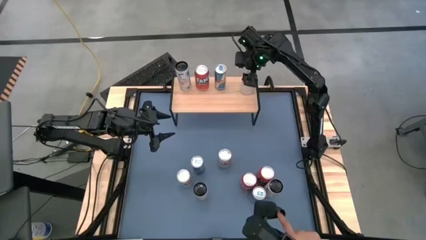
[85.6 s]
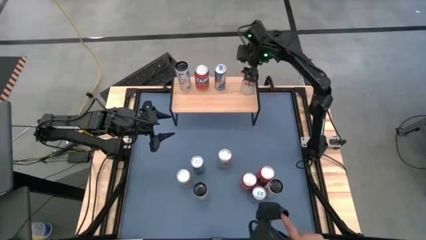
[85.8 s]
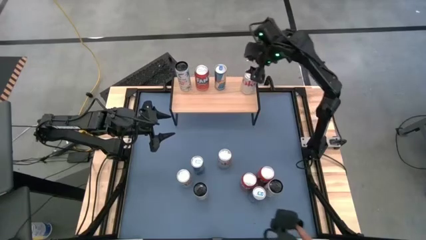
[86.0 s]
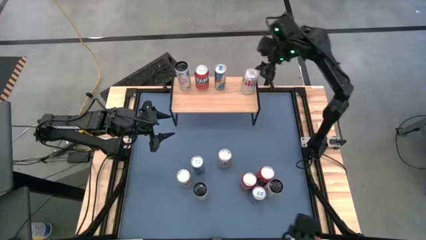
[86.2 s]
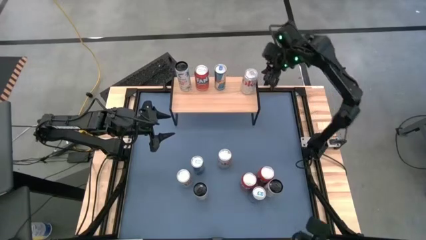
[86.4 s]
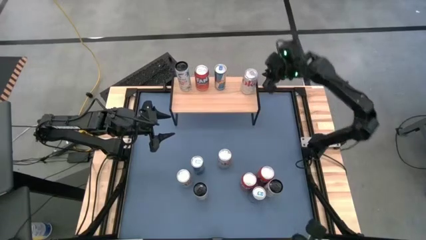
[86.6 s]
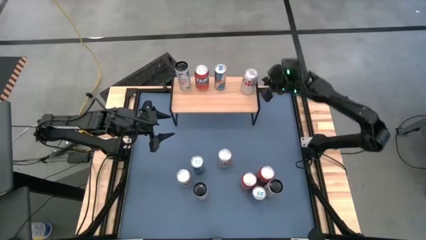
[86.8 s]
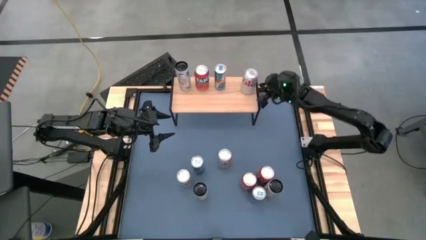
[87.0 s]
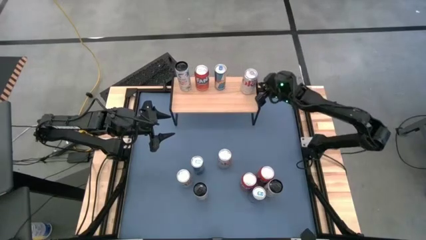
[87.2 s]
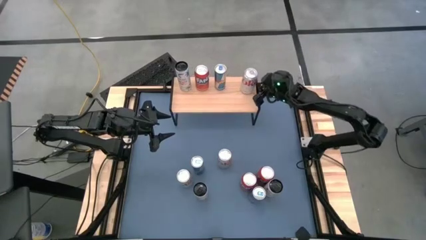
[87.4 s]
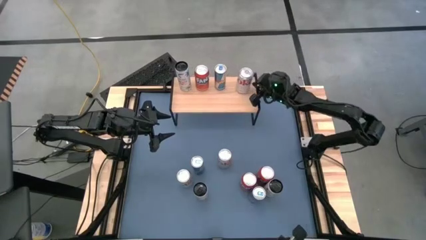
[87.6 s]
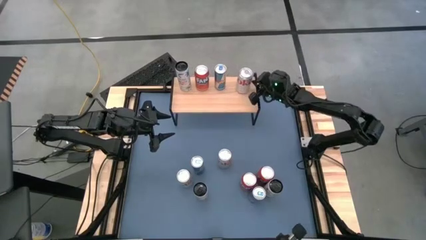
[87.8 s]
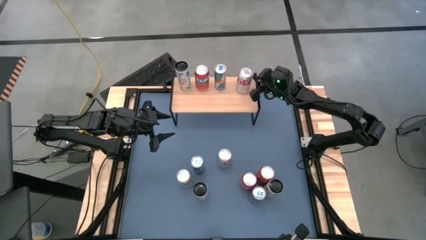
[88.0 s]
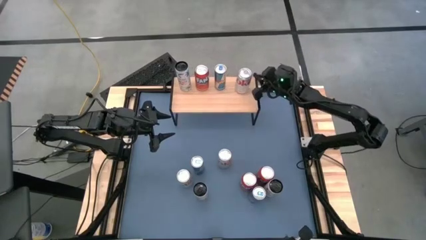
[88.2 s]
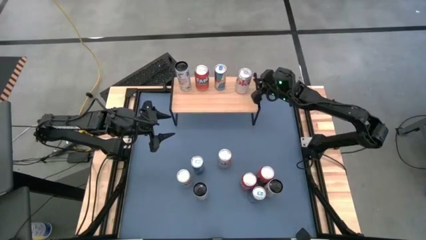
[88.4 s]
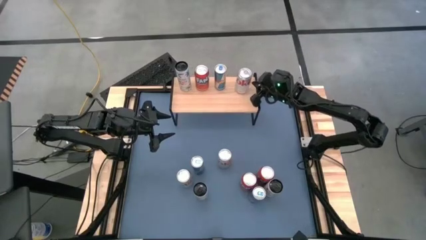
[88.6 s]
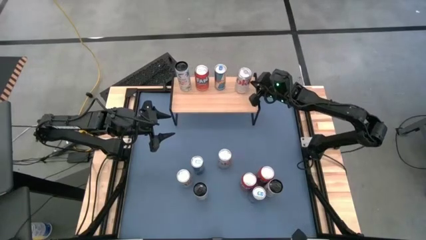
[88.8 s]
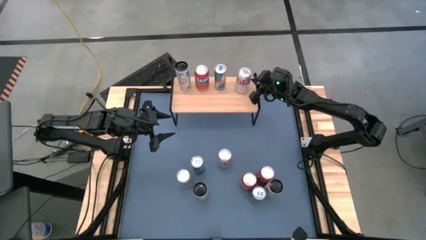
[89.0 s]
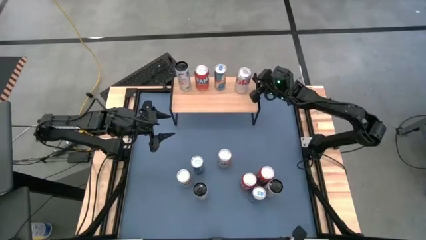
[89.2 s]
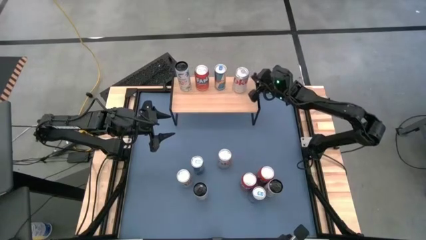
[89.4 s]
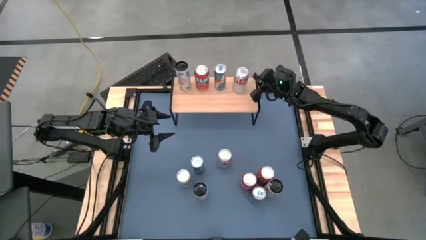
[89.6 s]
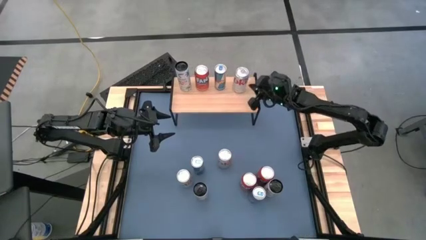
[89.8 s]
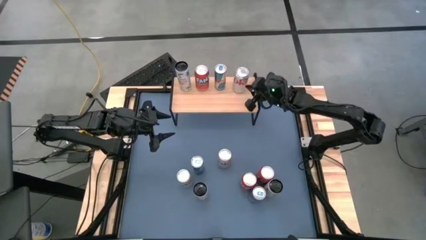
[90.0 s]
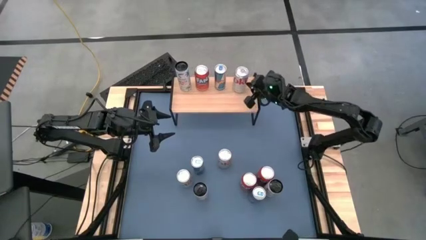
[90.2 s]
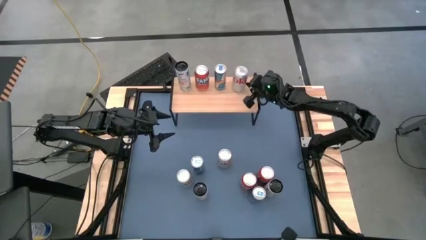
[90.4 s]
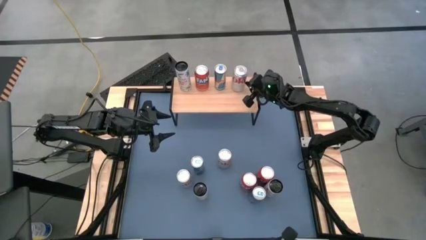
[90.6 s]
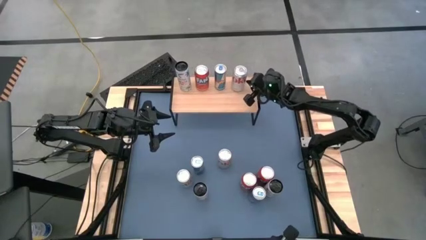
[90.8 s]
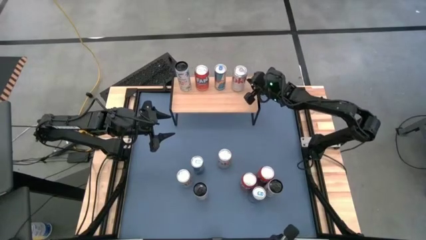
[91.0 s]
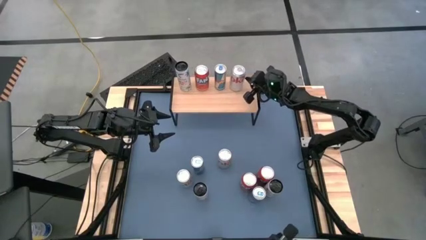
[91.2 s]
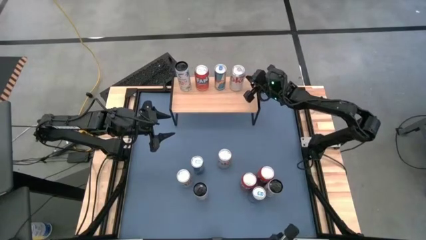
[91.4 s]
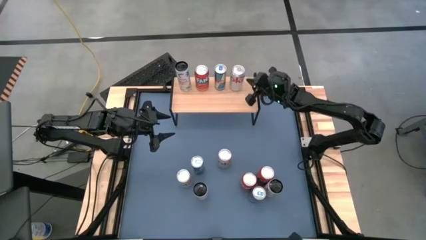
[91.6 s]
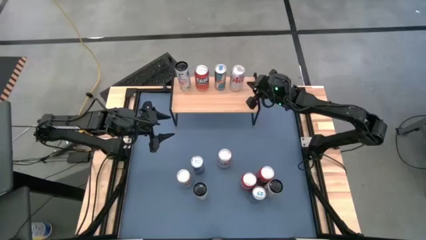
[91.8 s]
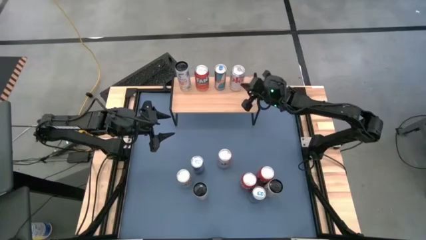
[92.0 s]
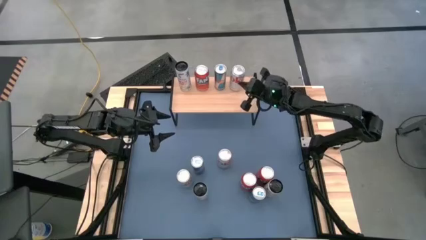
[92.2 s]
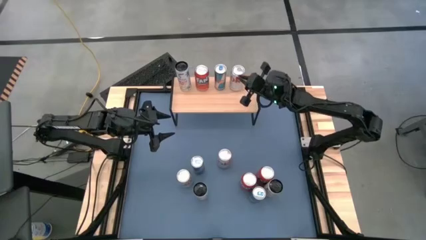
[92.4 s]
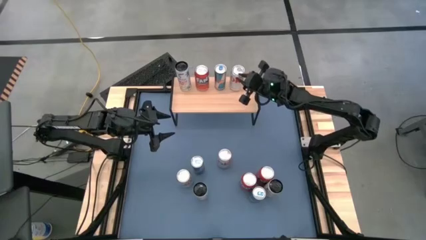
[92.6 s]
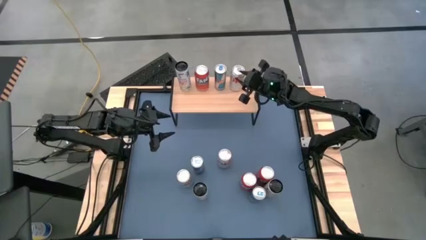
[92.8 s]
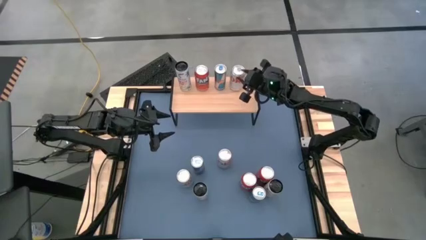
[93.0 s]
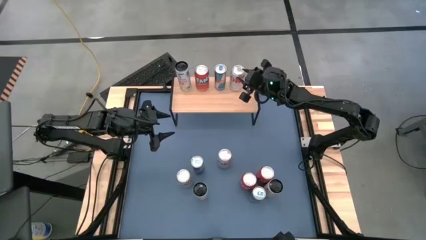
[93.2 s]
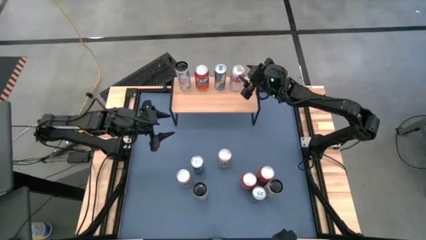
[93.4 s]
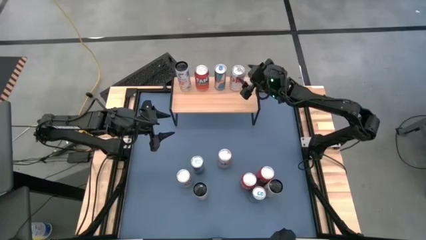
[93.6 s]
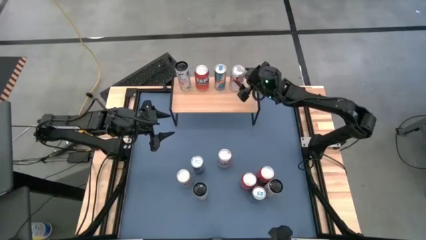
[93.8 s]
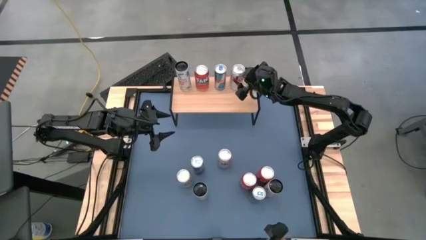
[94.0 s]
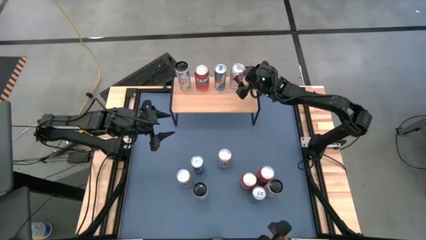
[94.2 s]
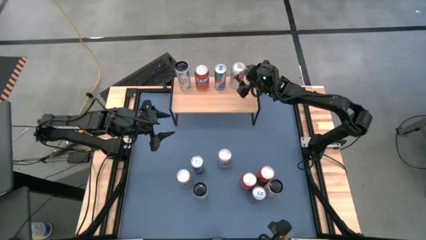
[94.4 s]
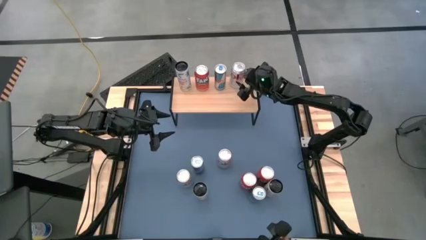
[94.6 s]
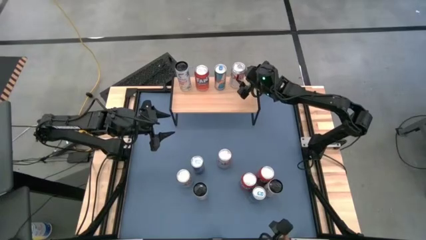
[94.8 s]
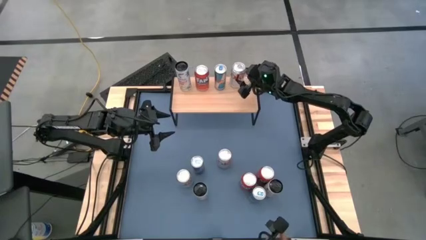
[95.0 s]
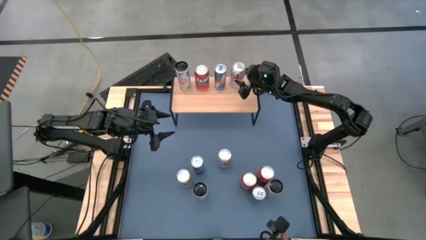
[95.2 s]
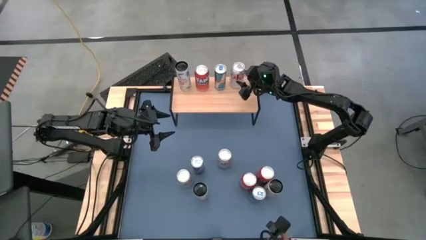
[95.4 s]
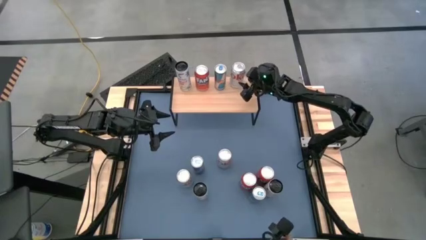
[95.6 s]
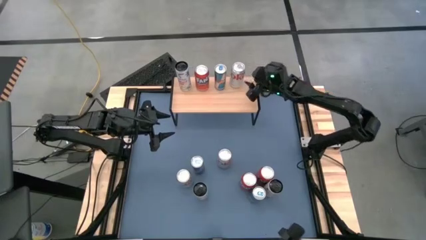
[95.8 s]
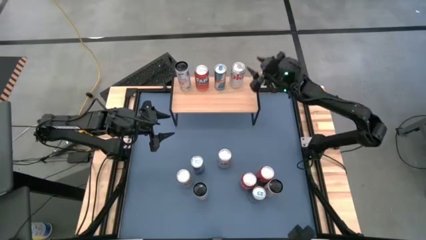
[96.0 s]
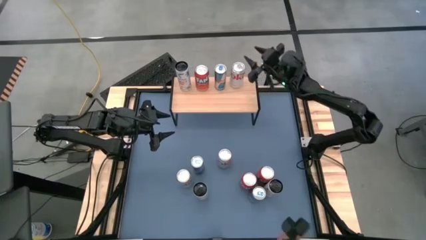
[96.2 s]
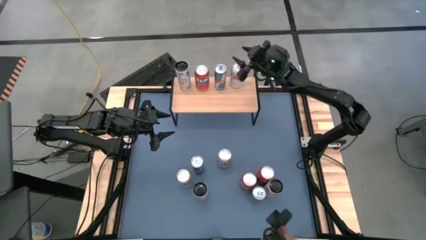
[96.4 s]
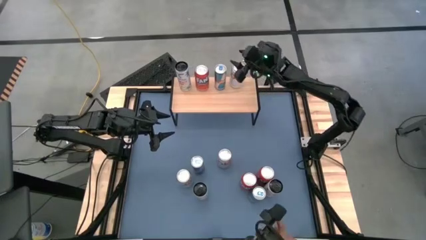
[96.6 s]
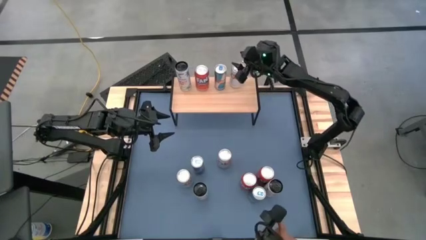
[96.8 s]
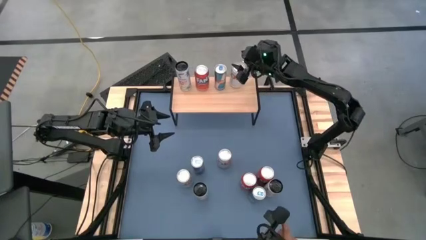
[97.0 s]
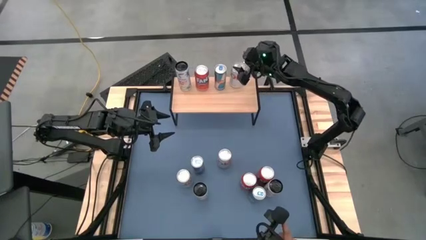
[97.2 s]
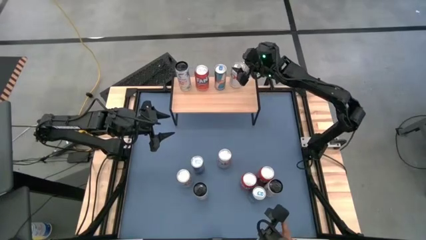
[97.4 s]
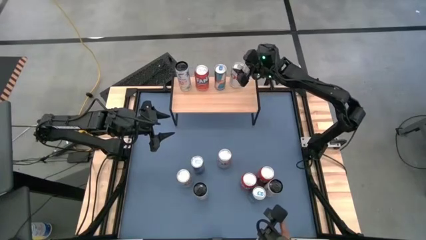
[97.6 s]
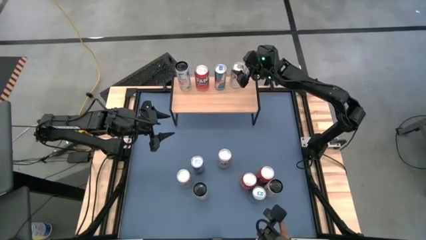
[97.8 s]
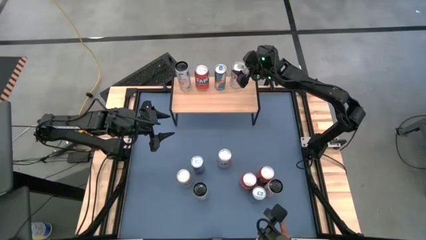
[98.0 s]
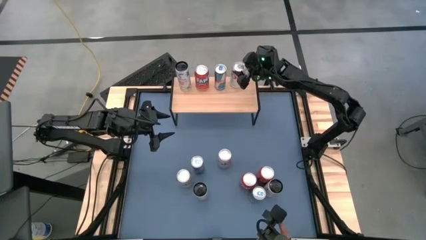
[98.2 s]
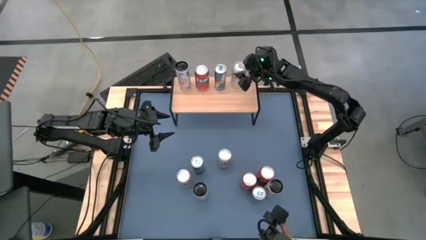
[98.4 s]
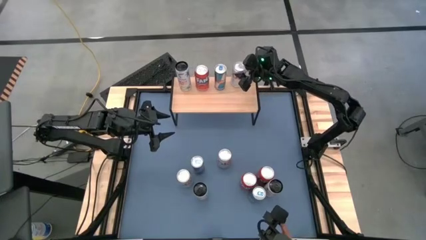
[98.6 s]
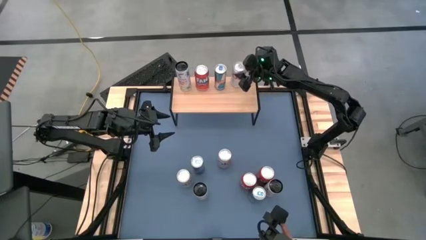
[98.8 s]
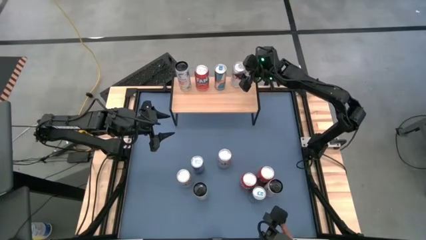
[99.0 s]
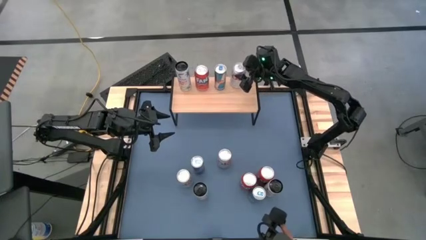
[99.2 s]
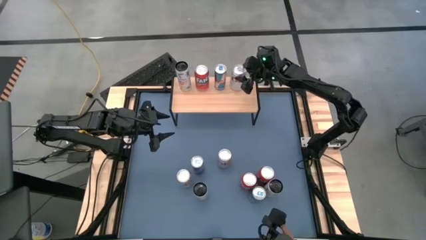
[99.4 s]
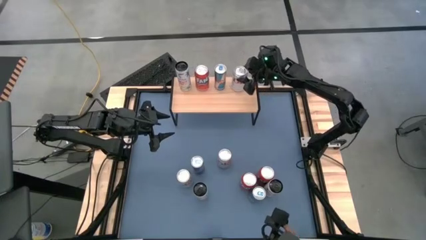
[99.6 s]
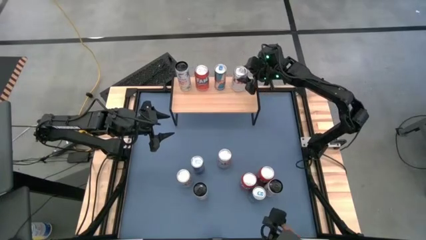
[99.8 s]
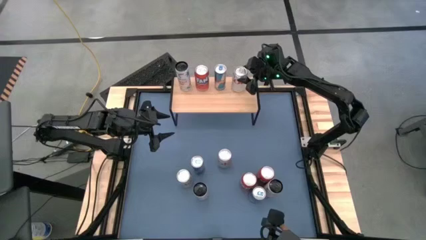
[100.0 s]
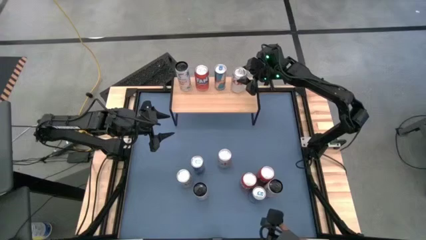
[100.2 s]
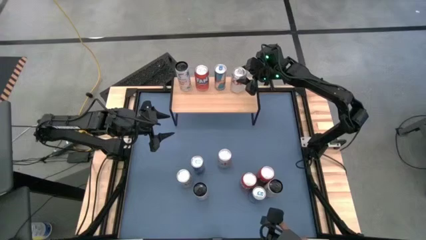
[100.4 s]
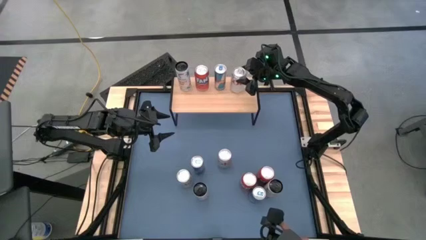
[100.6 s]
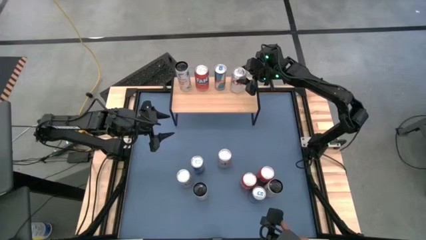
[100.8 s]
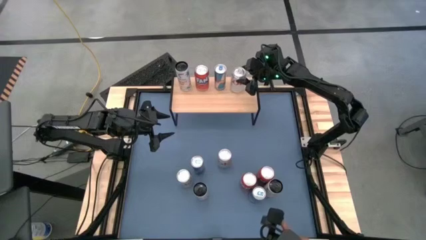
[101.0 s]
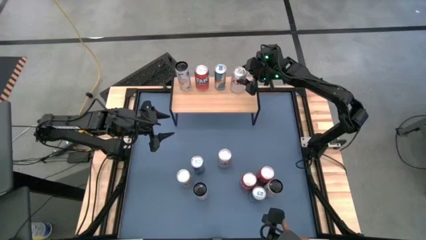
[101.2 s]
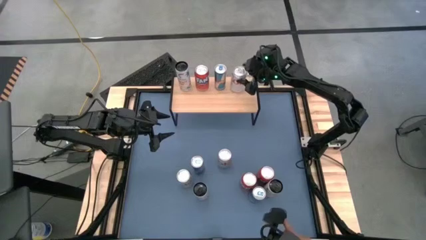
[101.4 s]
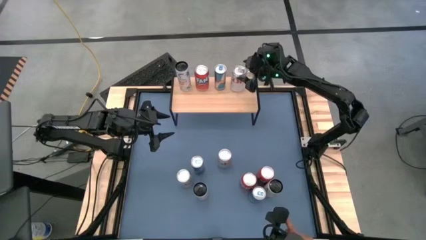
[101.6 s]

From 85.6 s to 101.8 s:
Task: Place canned beverage on shelf
Adjust the white soda can
